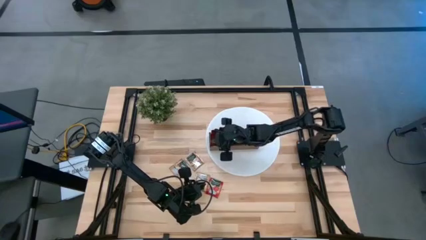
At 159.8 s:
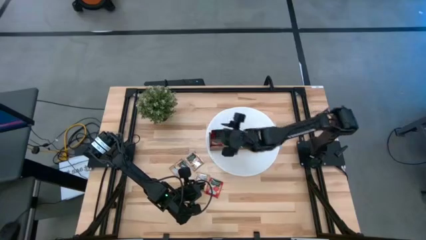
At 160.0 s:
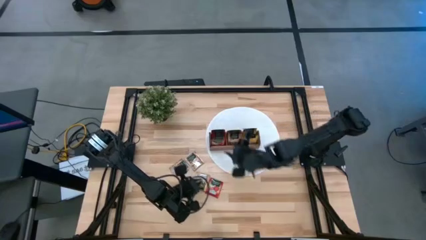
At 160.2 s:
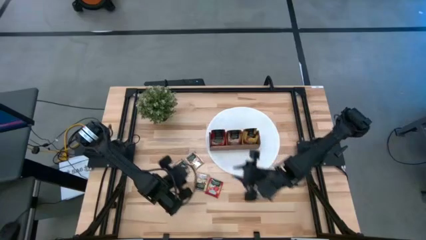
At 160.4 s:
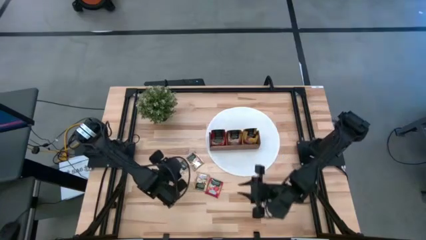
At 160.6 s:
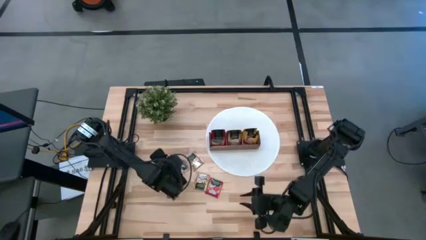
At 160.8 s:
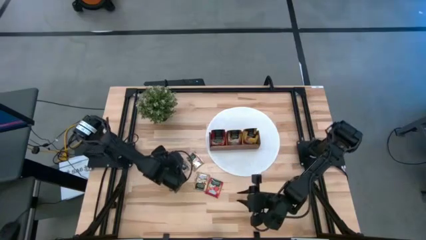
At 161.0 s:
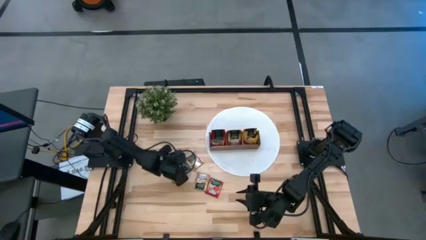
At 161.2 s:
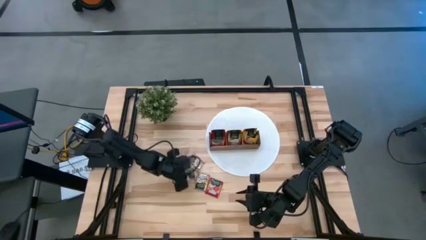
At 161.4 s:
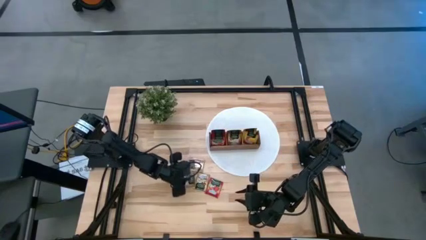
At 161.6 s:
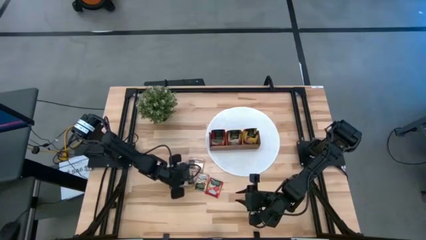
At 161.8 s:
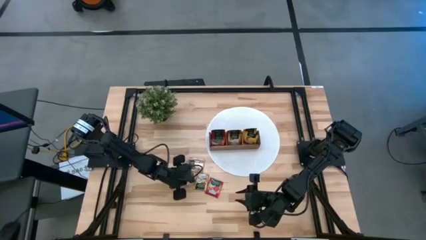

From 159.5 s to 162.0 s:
Task: Pick & Place Tea
Put the brown tea bag into the middle section of the wooden organizer

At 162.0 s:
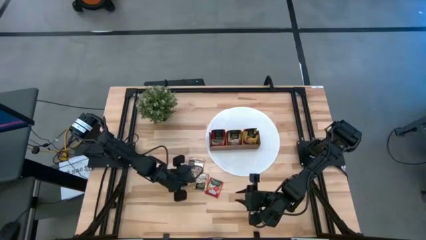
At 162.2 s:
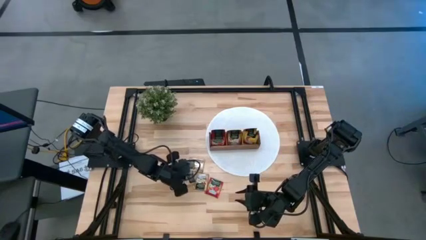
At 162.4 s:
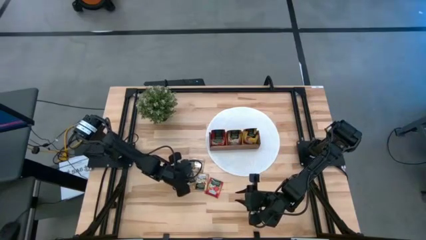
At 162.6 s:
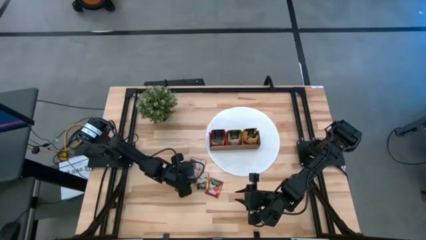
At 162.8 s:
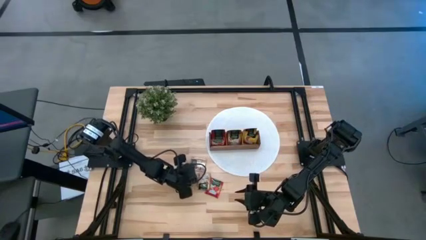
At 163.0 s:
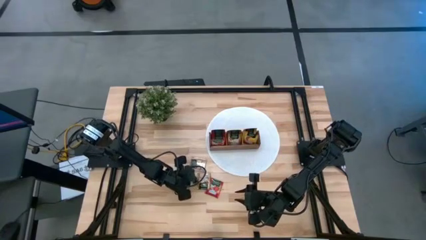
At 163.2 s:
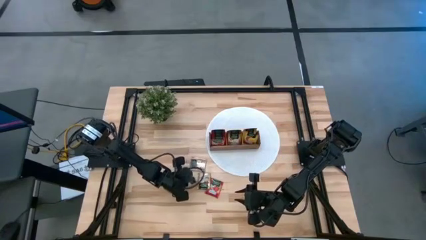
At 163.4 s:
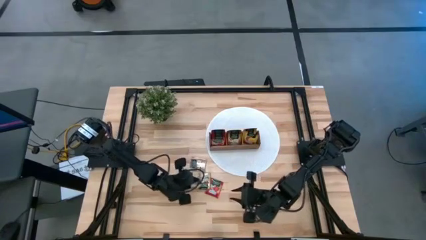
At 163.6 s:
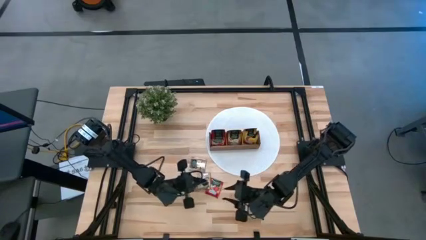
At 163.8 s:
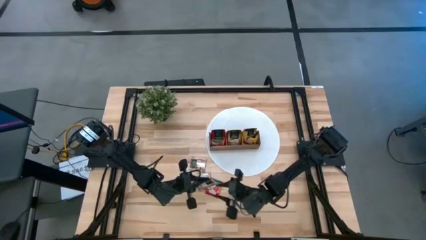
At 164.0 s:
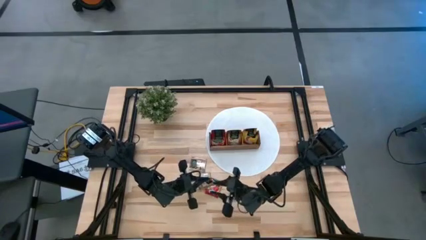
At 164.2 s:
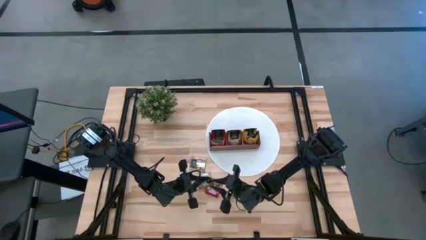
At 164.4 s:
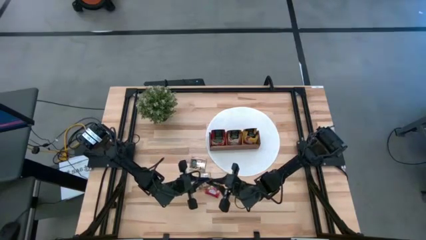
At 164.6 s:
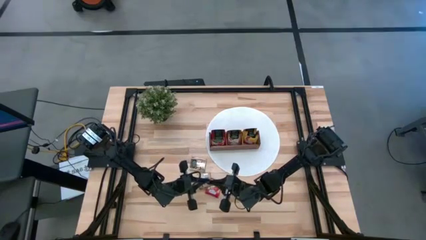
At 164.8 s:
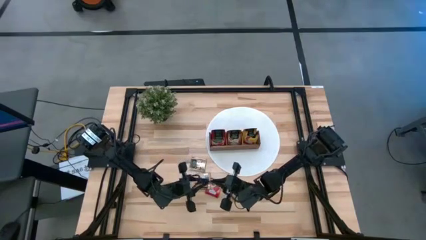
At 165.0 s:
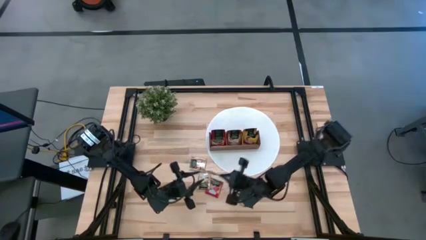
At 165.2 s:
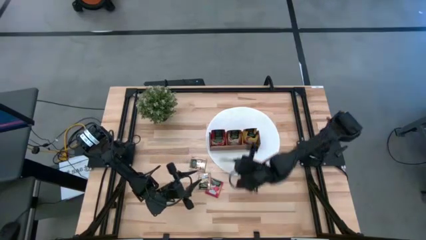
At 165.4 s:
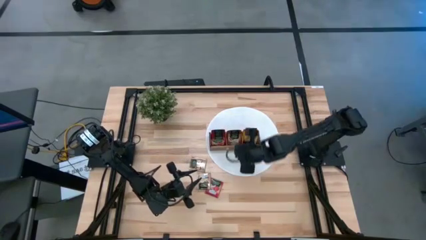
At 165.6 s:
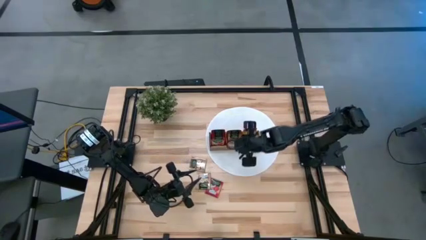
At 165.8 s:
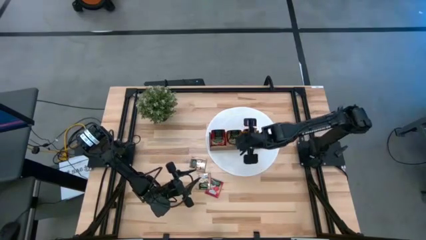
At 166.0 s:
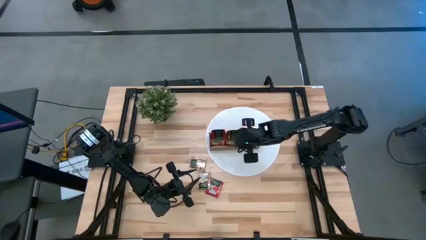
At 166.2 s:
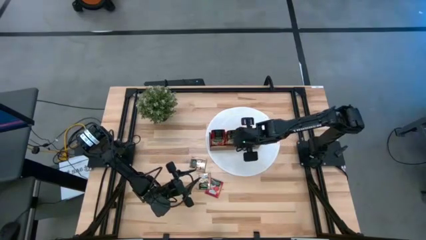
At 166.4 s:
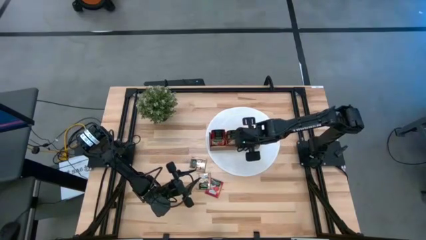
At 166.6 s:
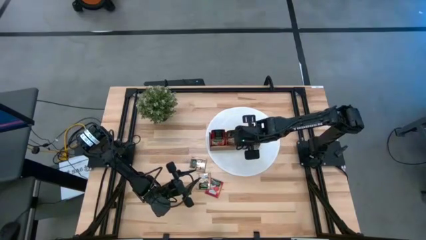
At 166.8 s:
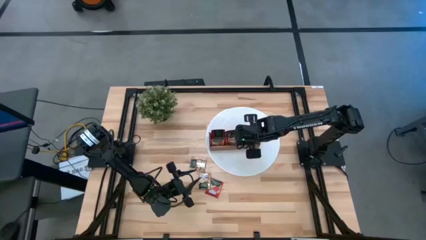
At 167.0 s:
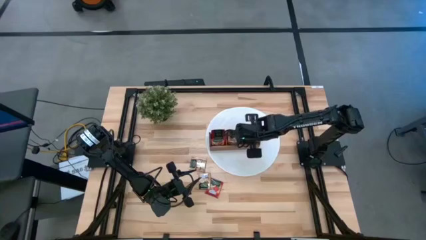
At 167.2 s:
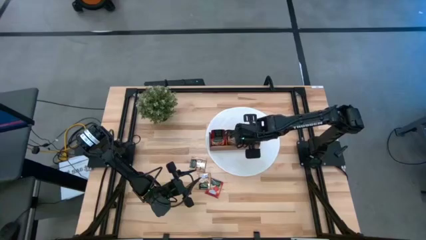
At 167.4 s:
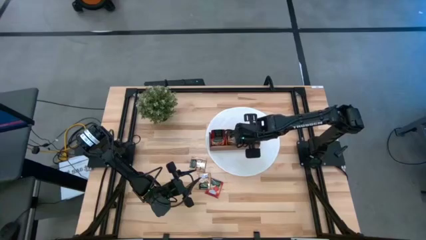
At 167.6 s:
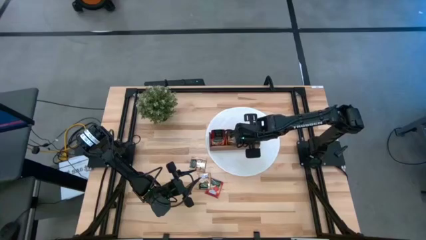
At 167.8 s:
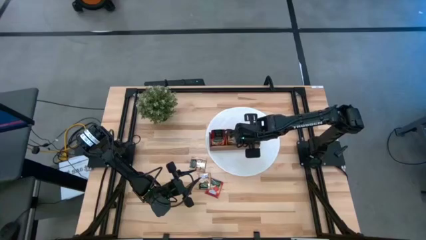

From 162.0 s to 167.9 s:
Put the brown tea bag into the middle section of the wooden organizer

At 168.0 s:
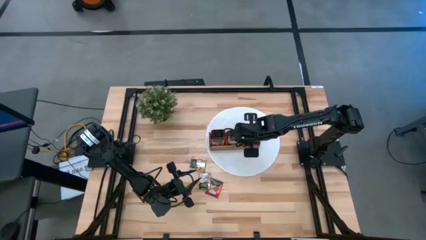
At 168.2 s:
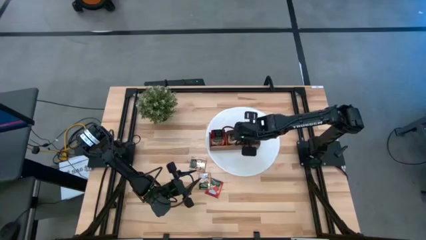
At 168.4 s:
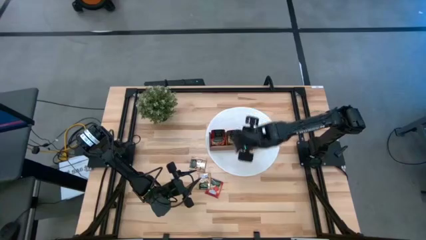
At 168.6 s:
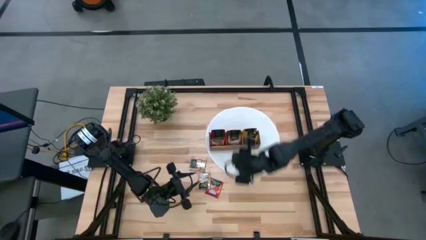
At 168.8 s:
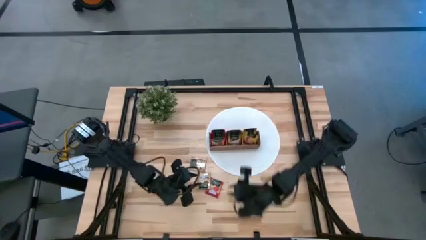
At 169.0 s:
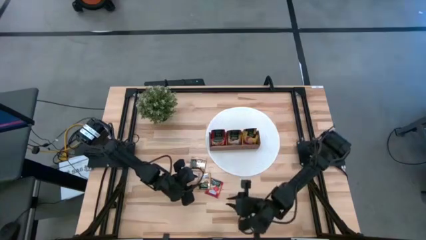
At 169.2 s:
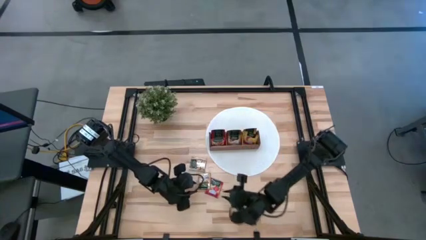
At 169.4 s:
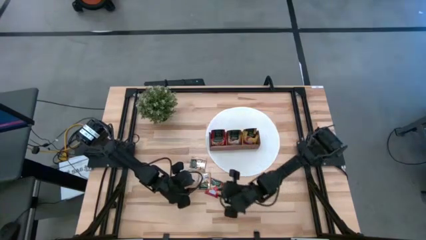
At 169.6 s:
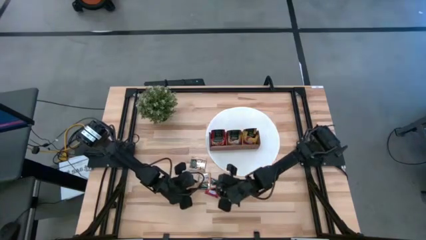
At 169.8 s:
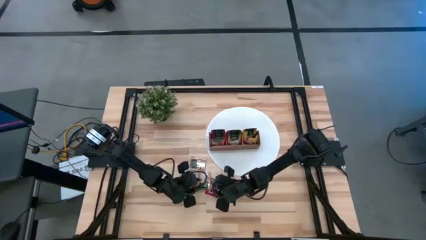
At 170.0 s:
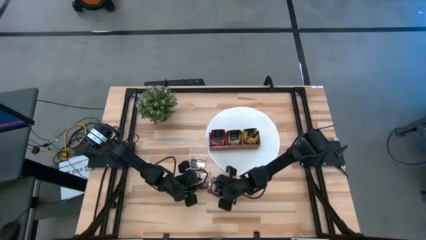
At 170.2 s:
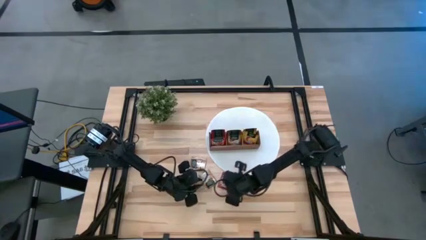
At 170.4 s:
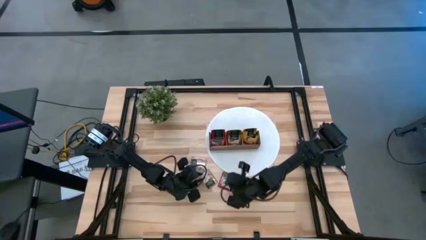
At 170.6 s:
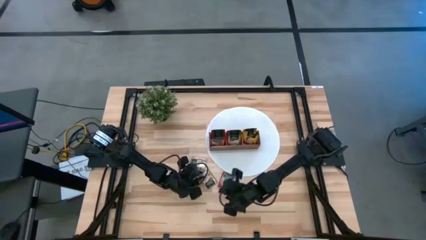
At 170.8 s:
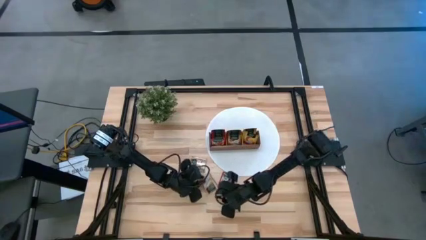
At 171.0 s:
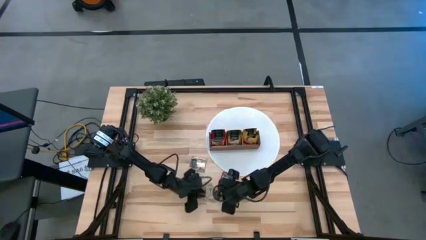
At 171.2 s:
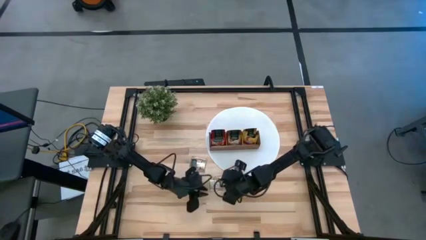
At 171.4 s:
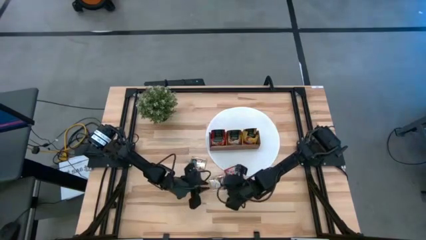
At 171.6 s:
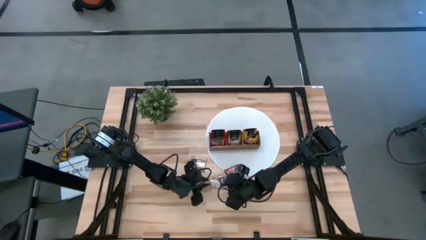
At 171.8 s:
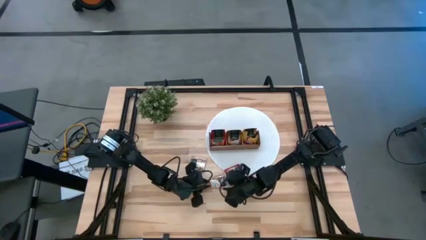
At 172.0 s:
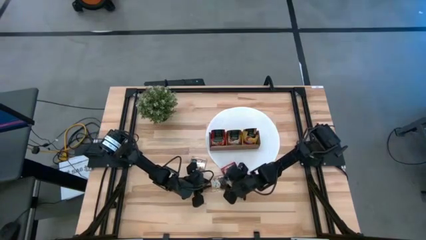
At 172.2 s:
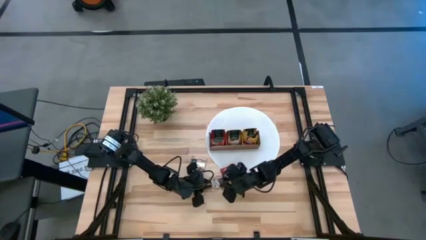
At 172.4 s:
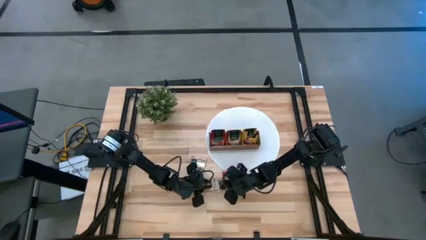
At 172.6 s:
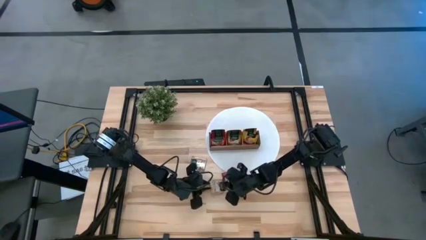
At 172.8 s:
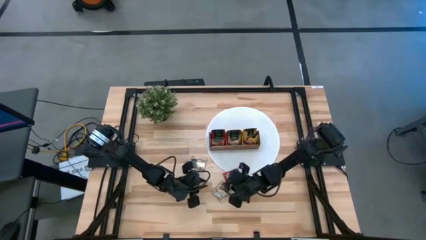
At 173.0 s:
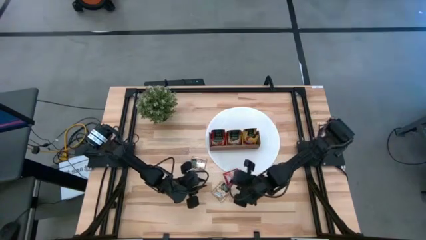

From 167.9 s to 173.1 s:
Put the brown tea bag into the middle section of the wooden organizer

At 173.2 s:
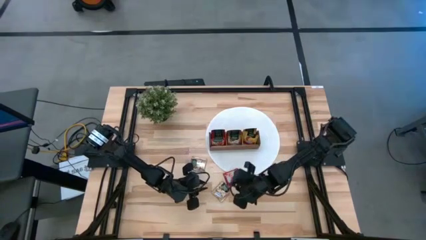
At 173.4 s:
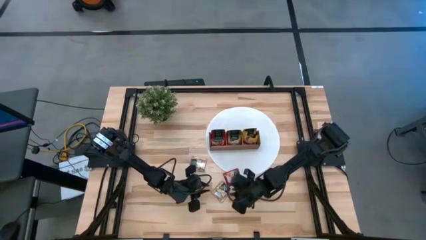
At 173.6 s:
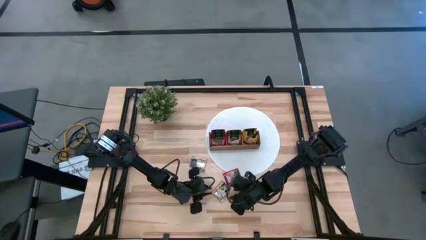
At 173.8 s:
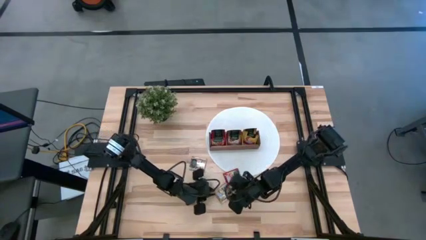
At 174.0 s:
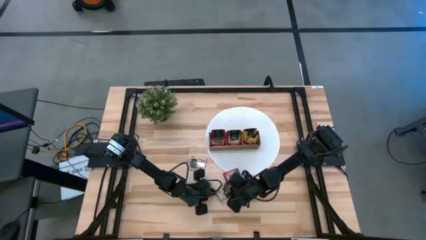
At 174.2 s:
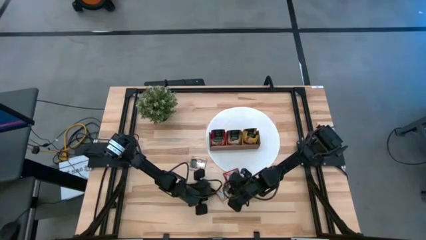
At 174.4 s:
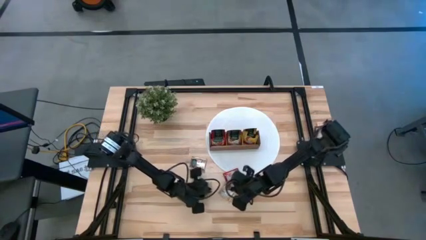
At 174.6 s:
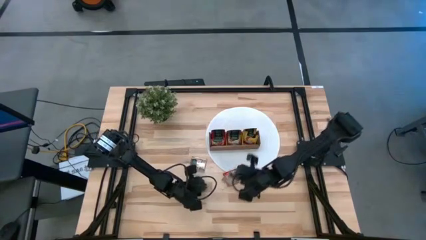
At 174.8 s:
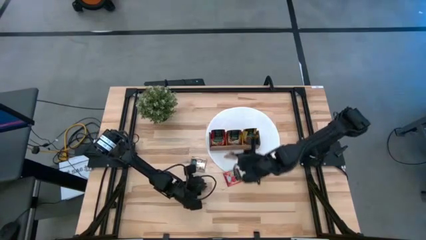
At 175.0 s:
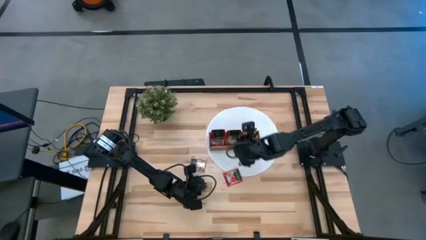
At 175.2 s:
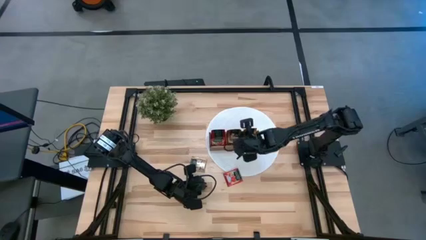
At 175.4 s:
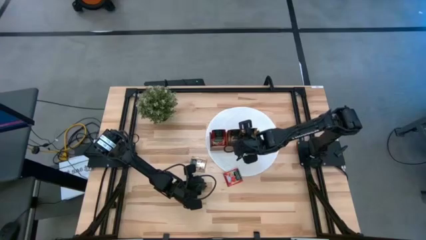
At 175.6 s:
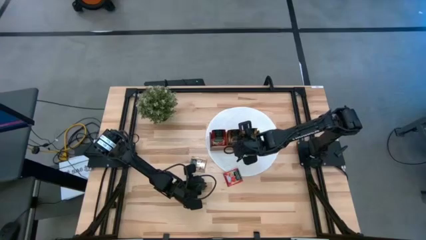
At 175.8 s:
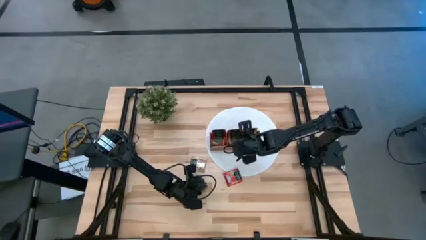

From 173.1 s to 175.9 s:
Put the brown tea bag into the middle section of the wooden organizer

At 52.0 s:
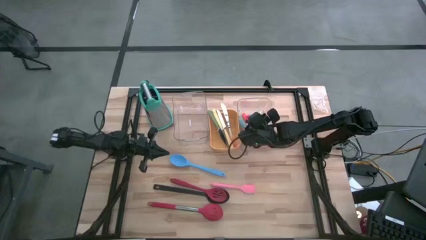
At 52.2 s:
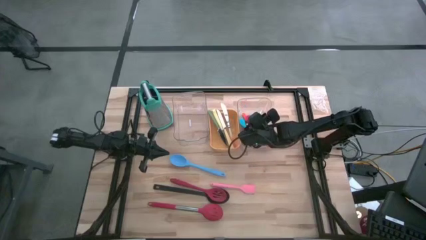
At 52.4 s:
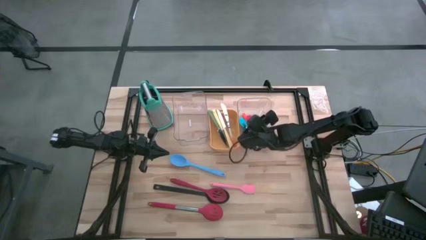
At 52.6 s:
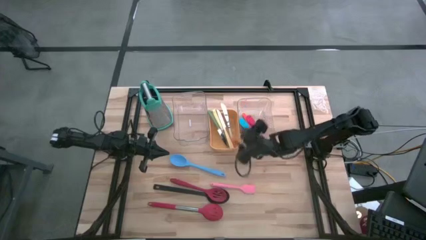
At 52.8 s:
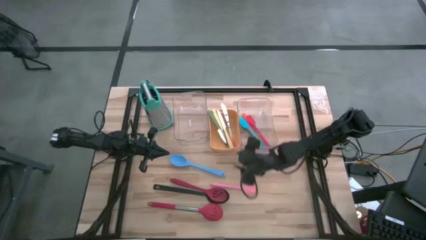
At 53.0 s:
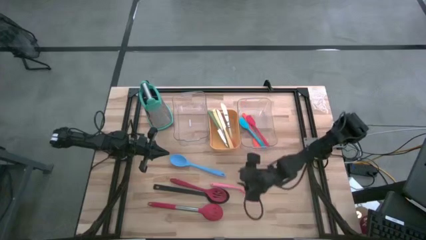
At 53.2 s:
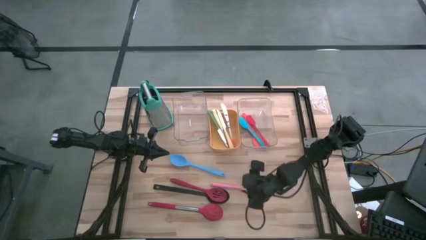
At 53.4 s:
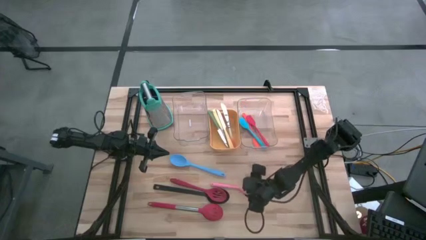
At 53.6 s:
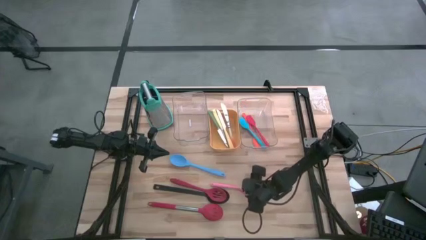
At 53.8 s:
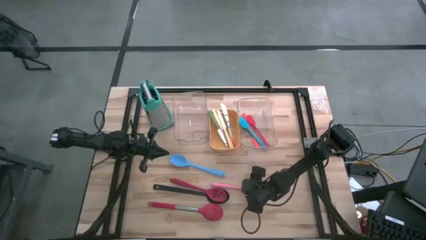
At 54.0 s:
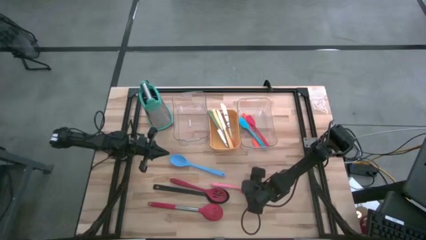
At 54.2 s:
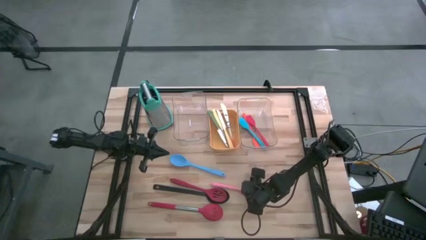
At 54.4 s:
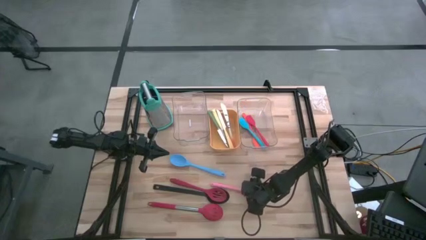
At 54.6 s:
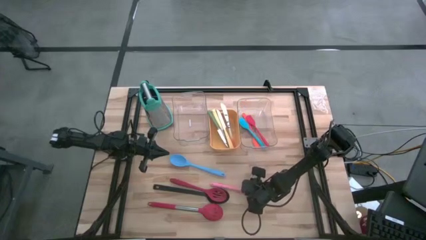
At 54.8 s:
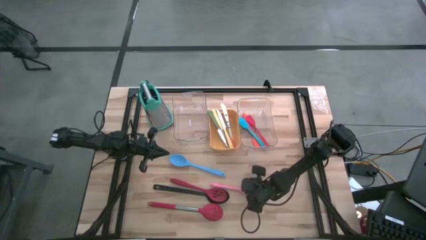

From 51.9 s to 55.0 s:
Task: Pick & Place Kitchen Items
Put the pink spatula into the right transparent bin
